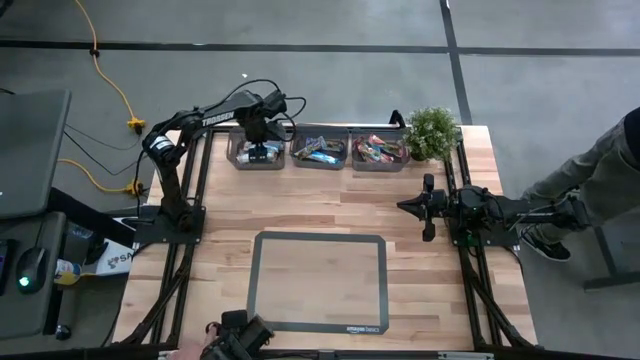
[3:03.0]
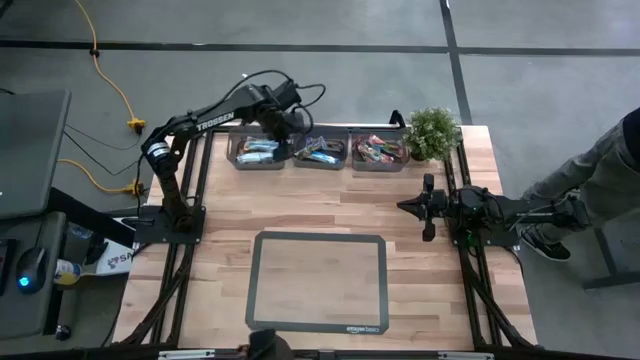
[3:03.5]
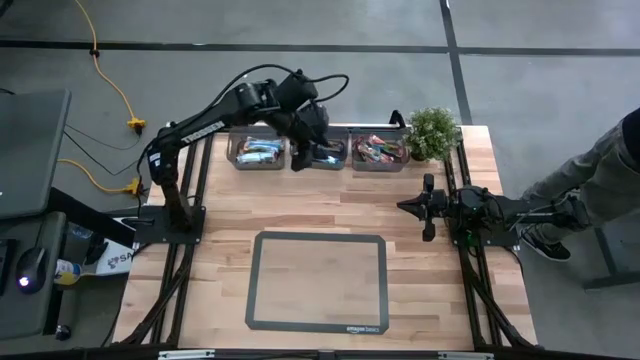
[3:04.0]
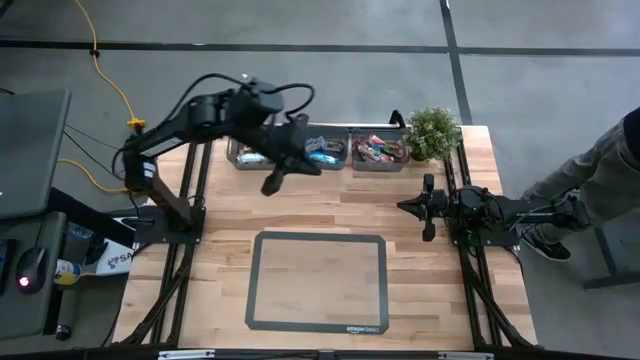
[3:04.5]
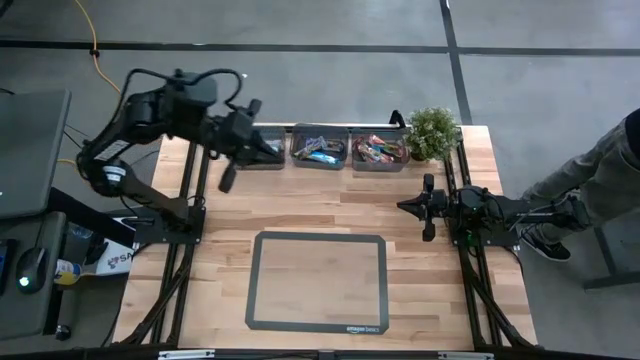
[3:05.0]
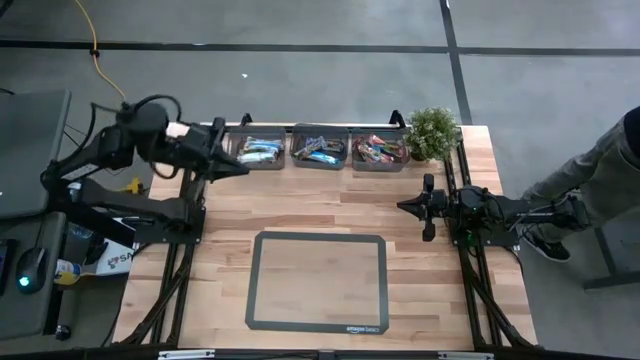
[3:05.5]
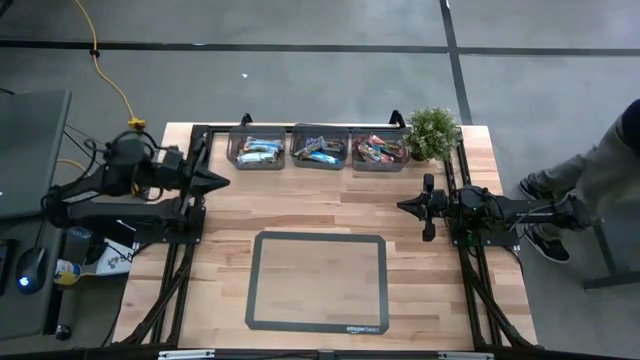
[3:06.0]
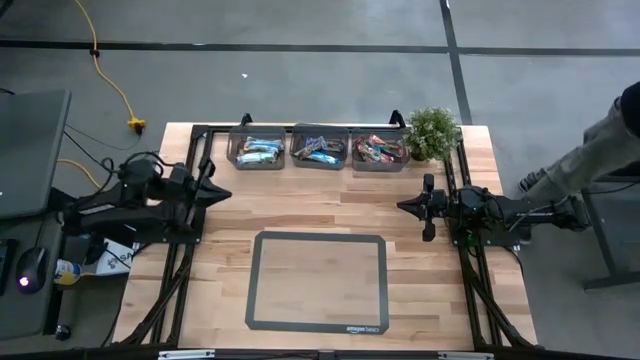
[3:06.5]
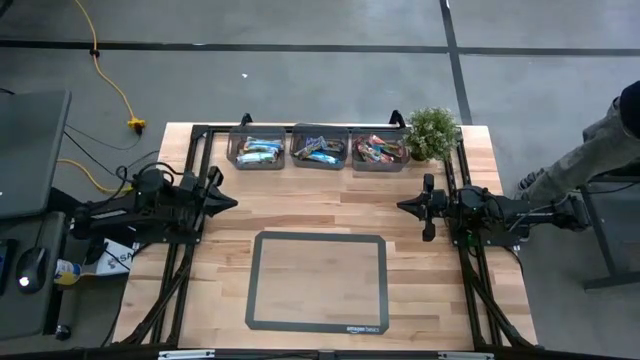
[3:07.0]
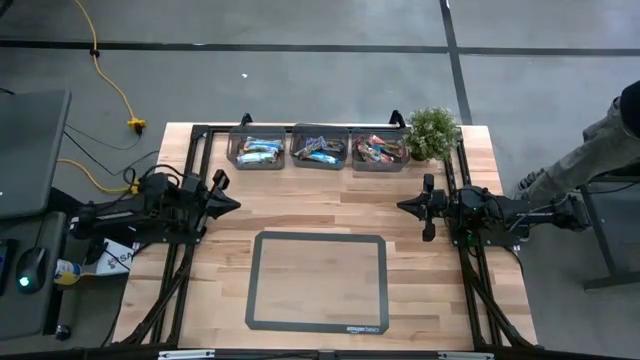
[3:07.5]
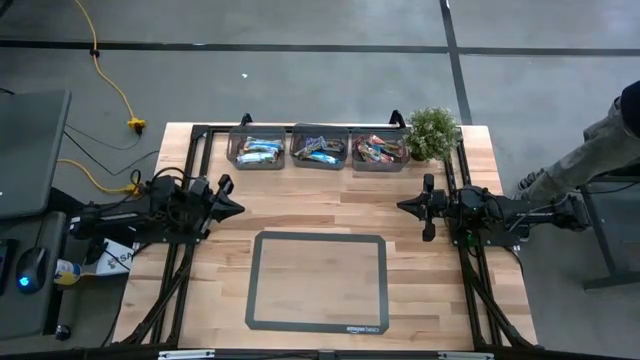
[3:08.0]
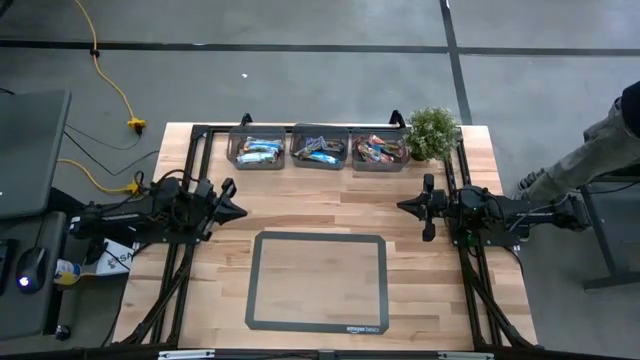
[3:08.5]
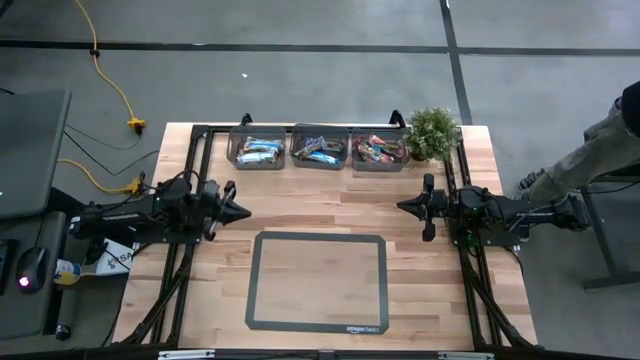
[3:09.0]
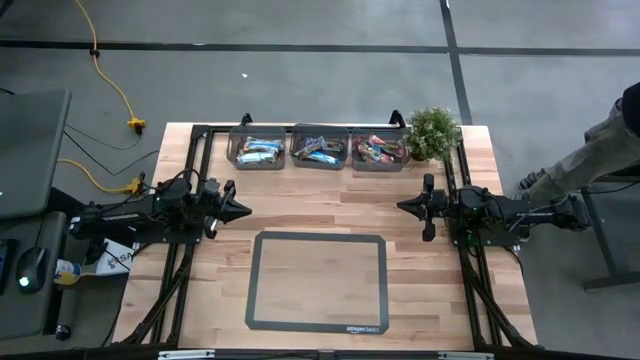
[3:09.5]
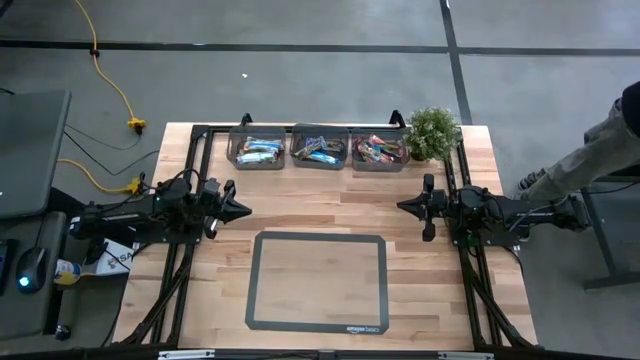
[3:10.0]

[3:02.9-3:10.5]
Task: Pick and place Granola Bars by type
Return to Home Position

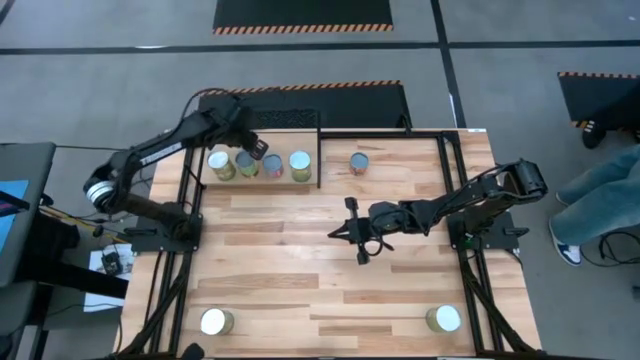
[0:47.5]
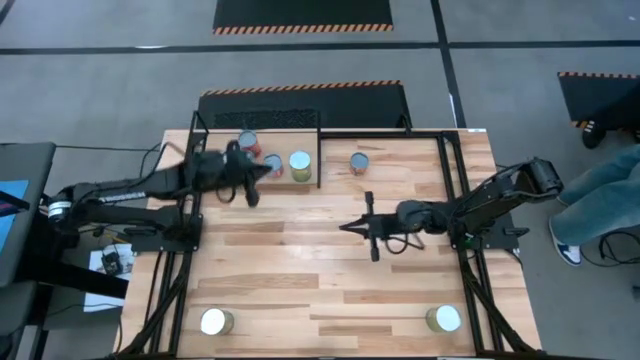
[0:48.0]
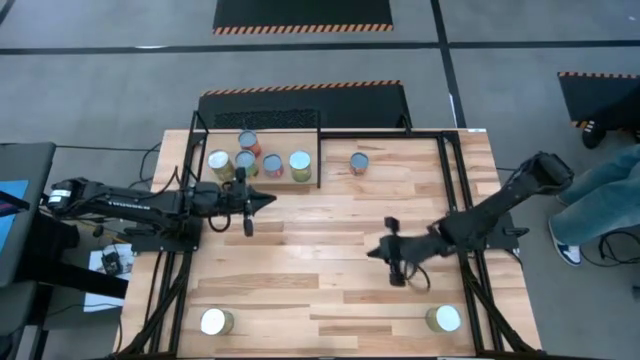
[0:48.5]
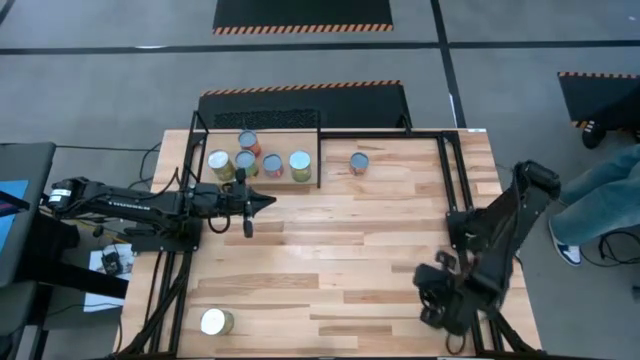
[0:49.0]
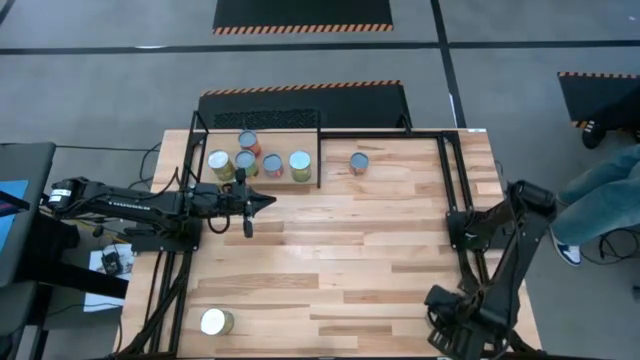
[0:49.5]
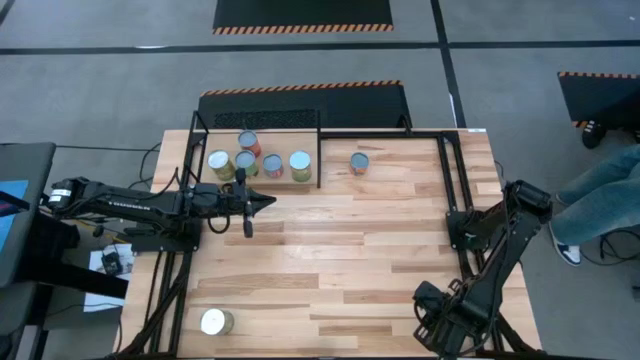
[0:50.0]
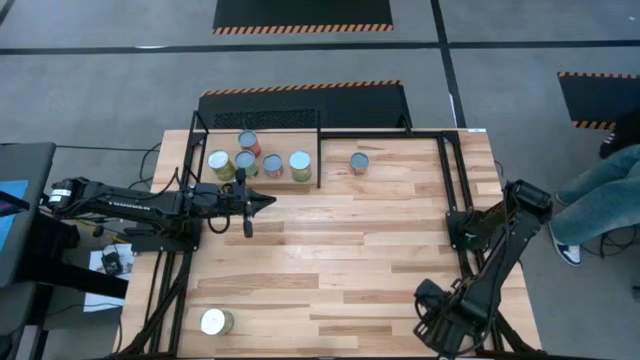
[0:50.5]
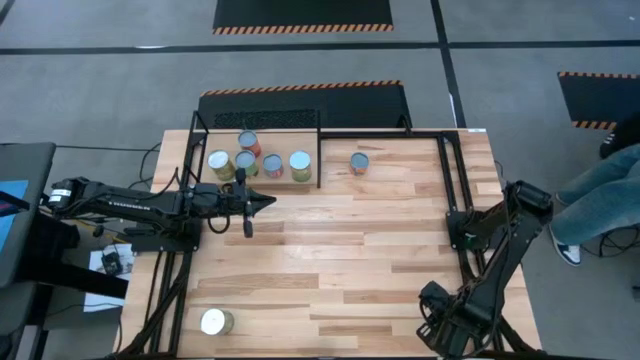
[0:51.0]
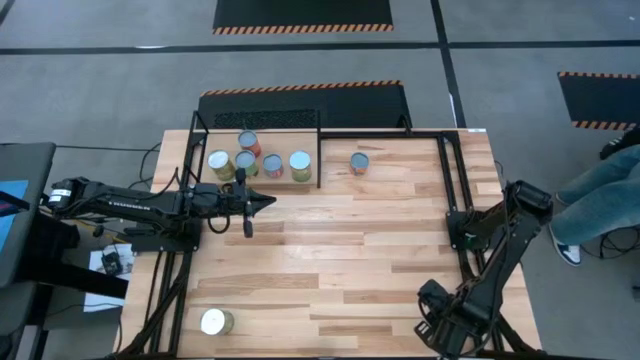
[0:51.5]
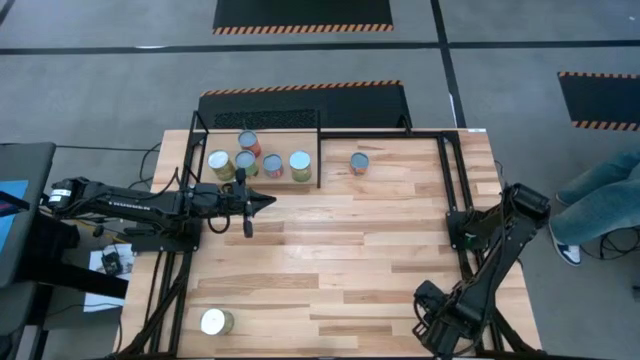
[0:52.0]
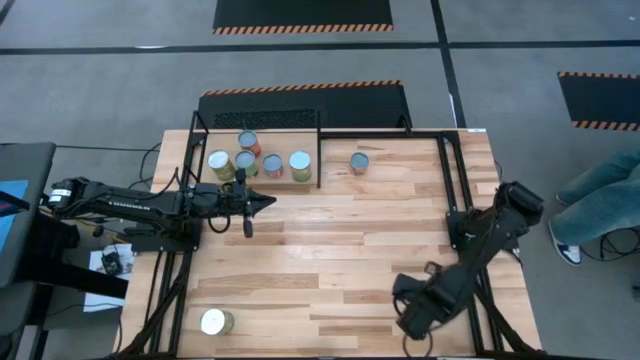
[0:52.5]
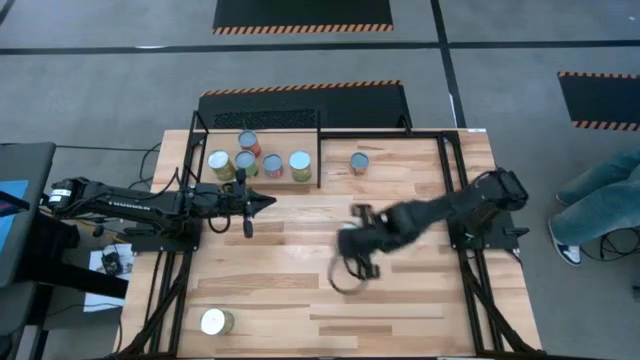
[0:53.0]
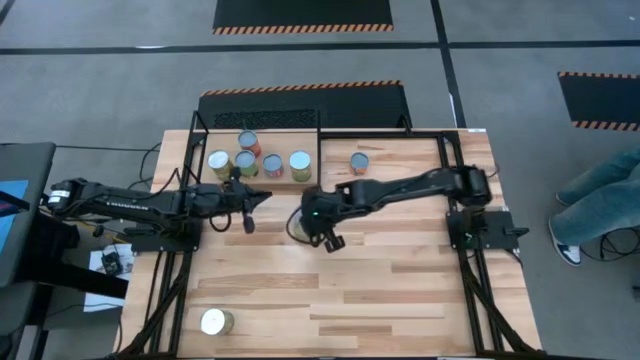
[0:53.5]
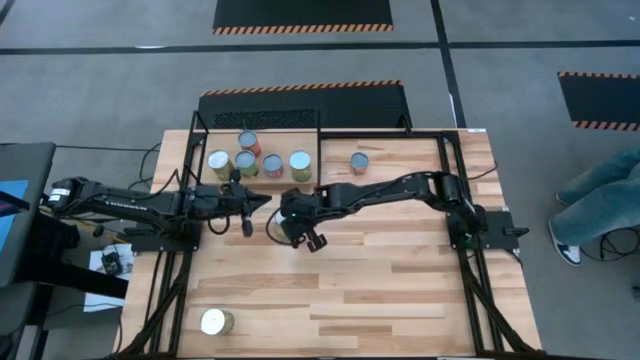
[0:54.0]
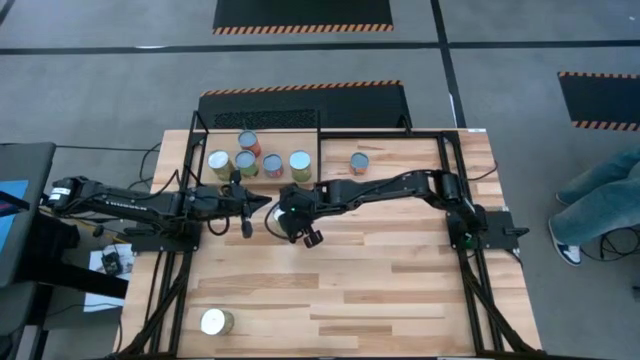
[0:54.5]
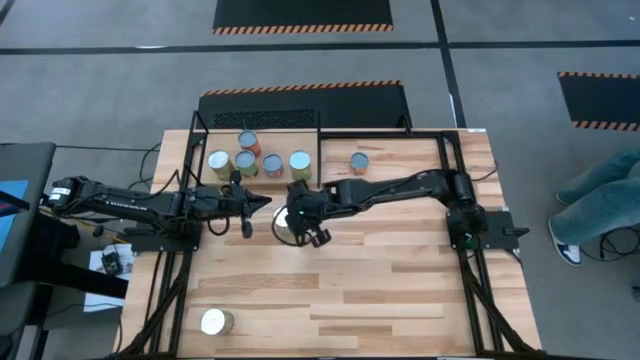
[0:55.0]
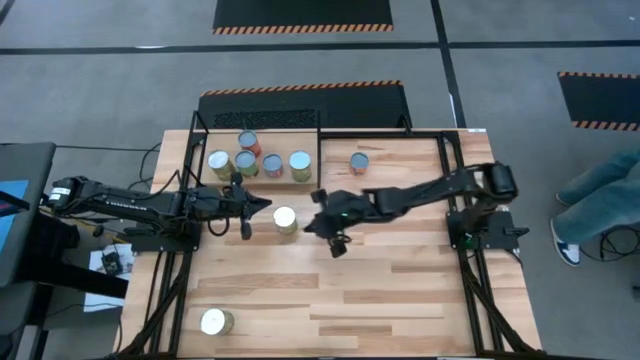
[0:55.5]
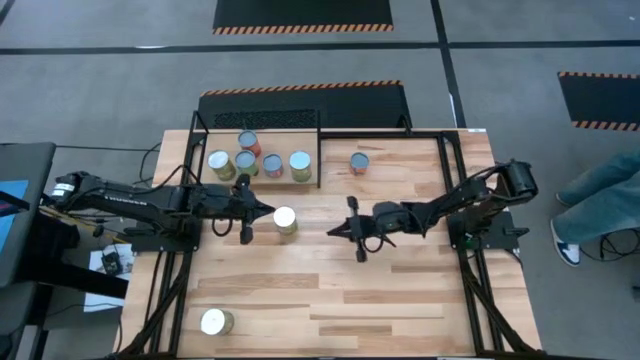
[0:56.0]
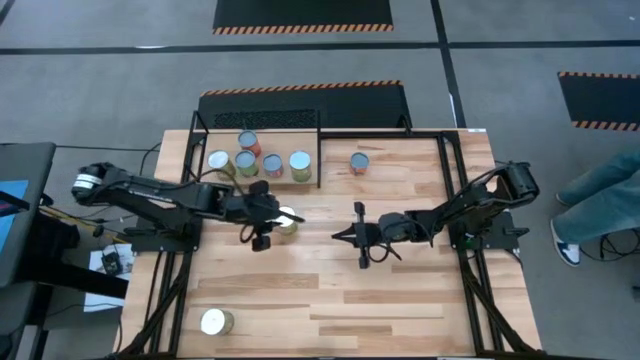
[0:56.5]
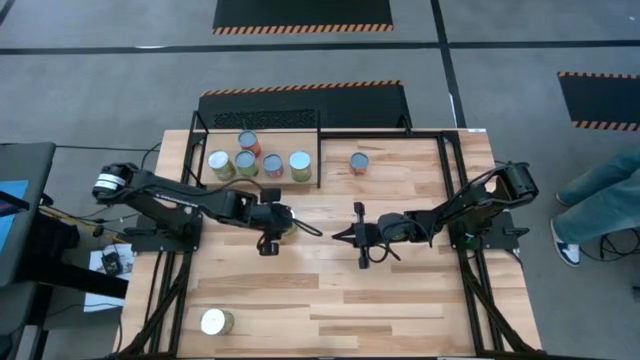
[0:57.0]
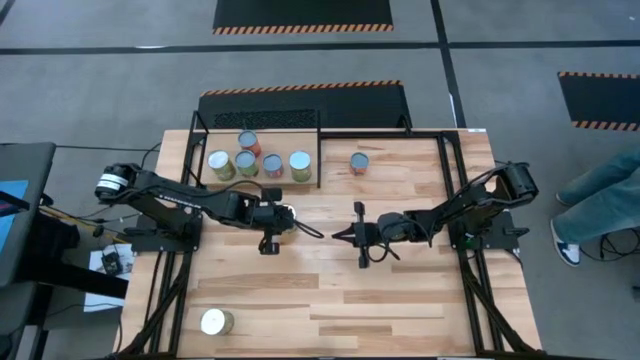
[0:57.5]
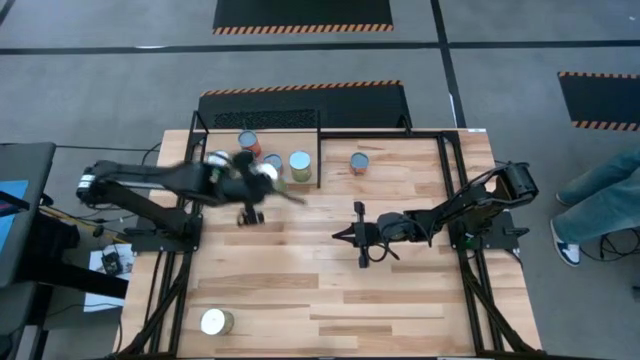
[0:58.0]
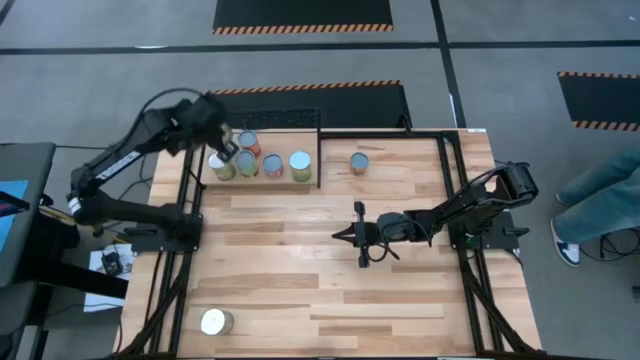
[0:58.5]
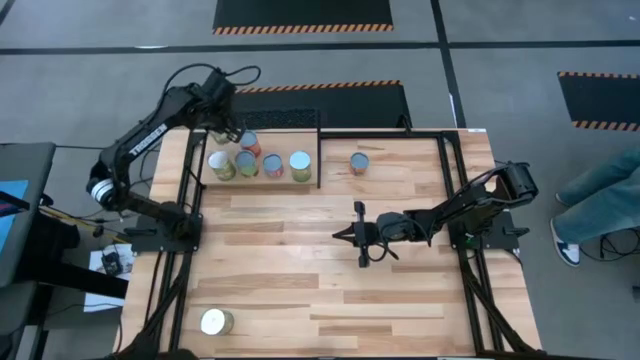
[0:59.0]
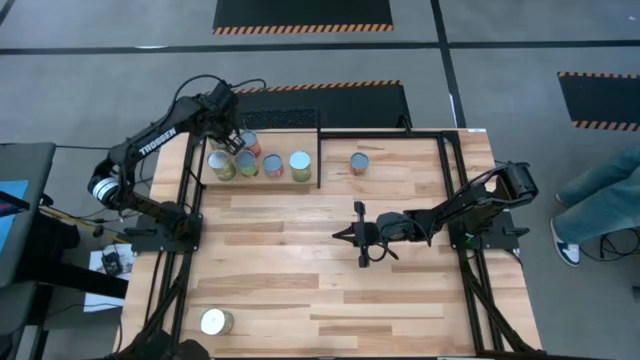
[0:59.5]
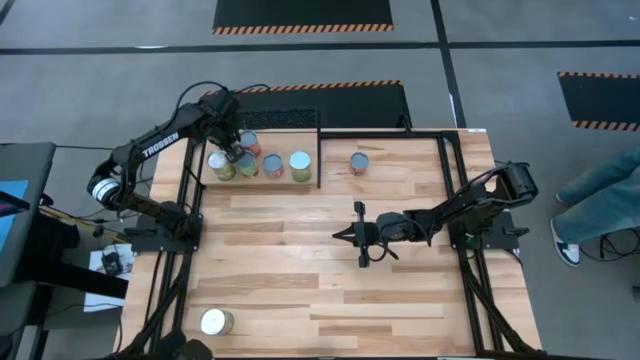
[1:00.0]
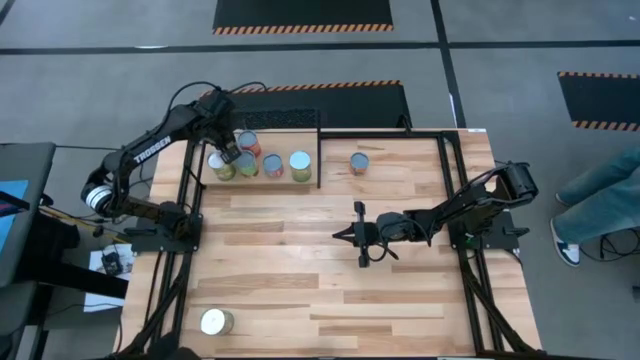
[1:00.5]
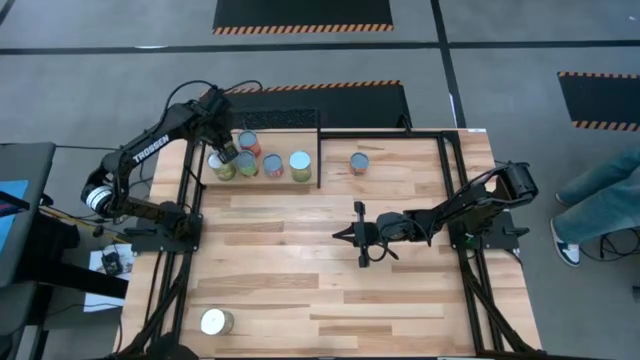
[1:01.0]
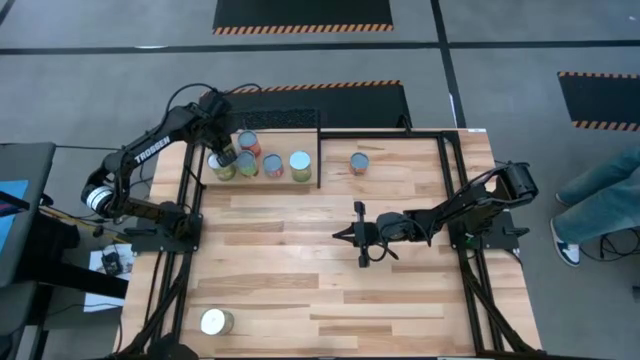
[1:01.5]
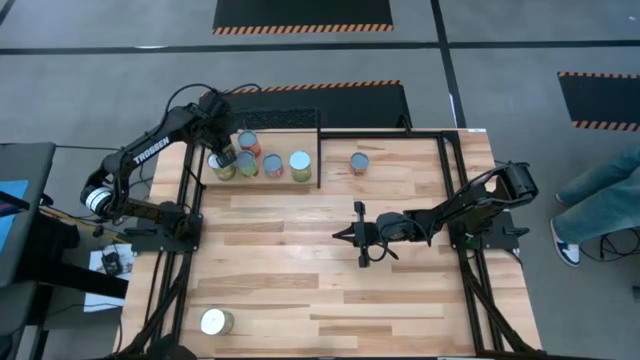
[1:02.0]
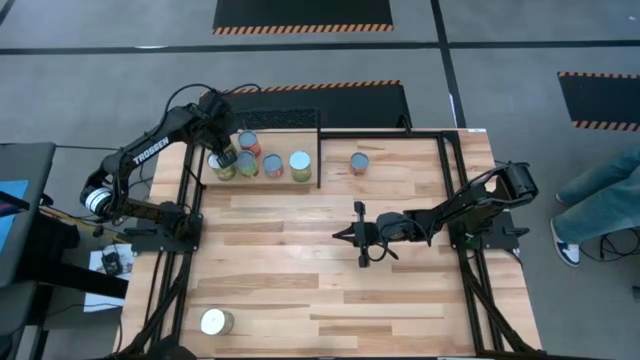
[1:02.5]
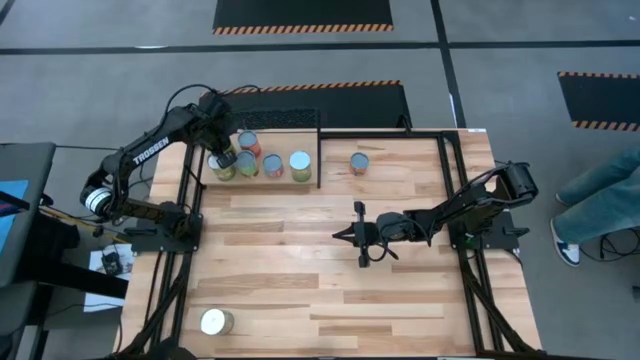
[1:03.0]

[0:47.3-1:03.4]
Task: Pick and place cans onto a shelf
Put the canned pears on the shelf
